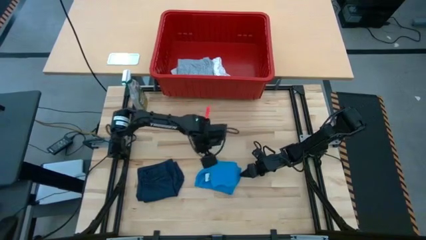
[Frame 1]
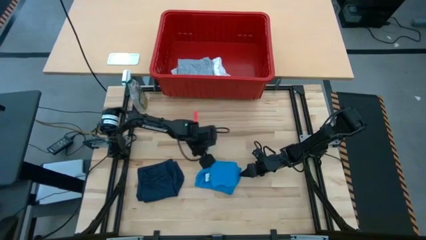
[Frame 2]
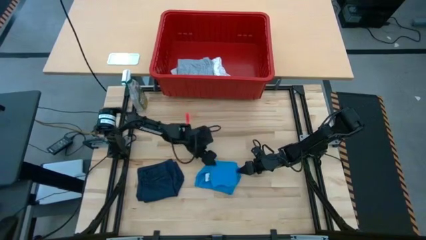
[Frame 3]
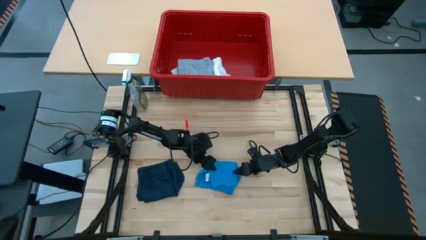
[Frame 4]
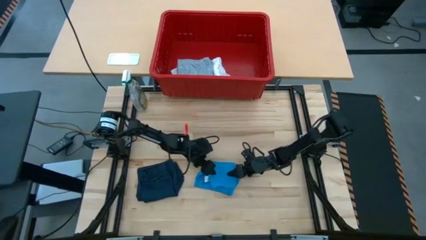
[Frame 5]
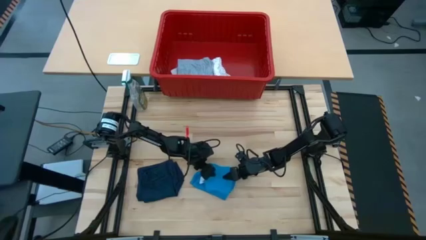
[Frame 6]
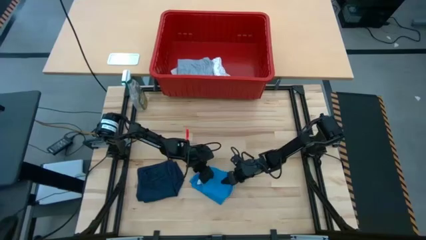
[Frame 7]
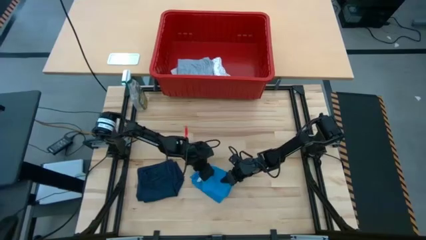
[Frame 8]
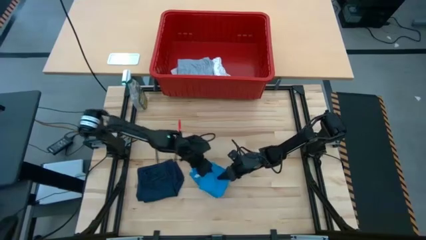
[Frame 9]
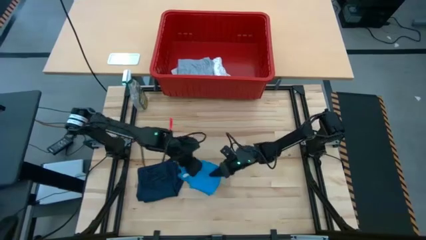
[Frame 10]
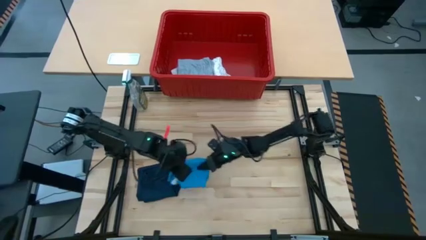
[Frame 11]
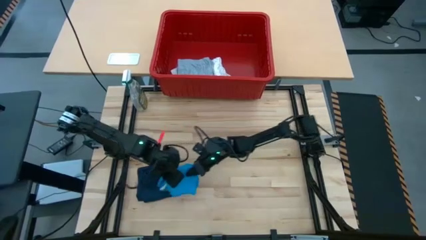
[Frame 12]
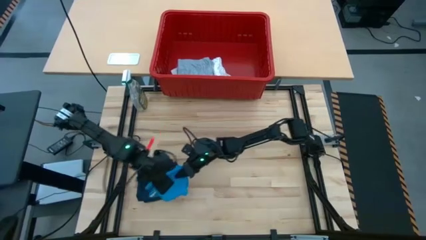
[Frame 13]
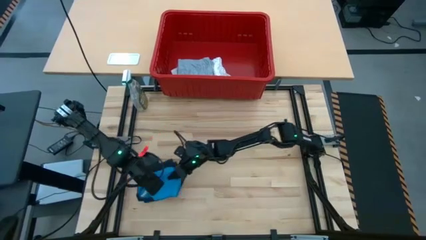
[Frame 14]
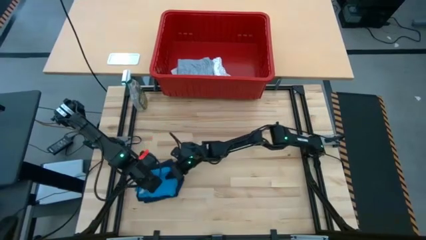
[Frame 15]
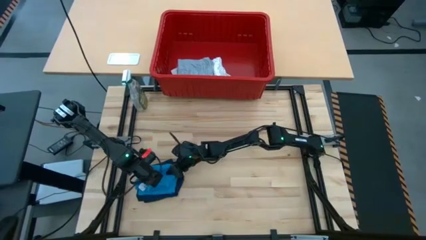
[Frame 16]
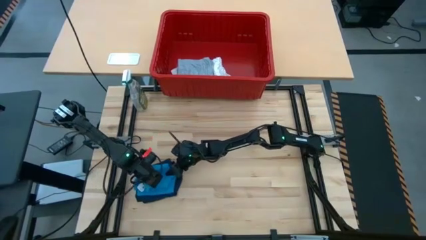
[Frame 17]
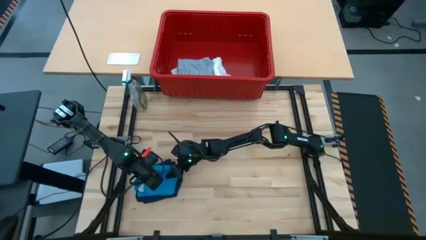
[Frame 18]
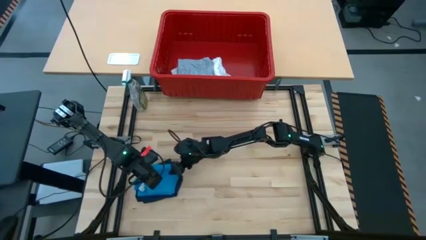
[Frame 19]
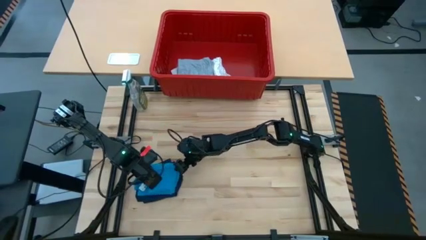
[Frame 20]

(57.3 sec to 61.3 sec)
Task: Fold laundry
Stack the light blue shorts on top of the dark blue shorts

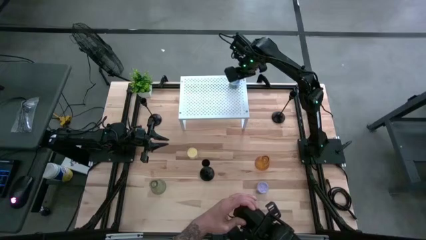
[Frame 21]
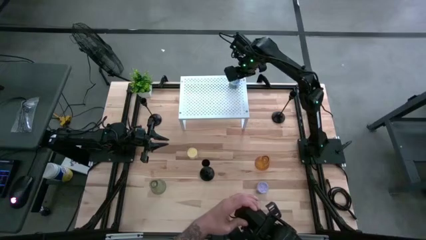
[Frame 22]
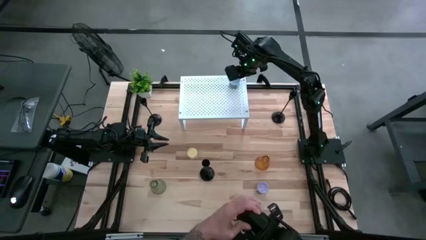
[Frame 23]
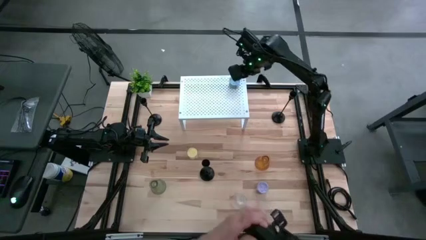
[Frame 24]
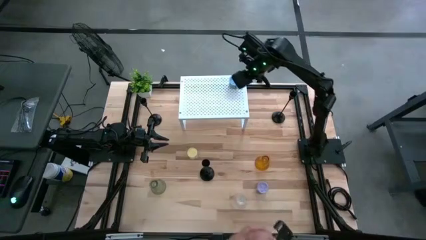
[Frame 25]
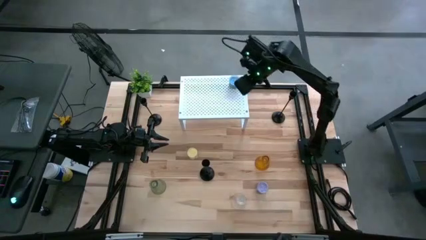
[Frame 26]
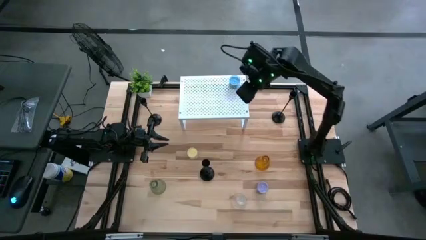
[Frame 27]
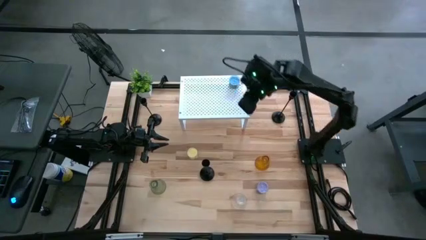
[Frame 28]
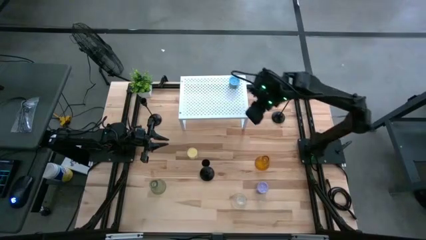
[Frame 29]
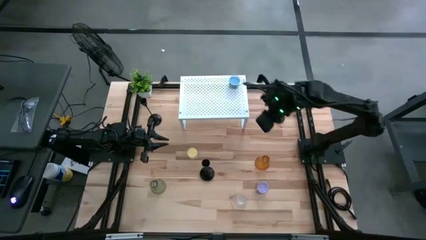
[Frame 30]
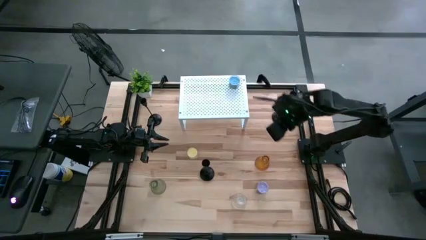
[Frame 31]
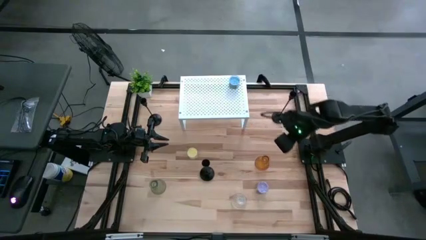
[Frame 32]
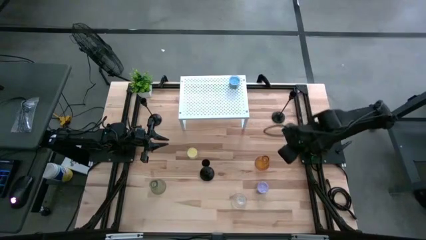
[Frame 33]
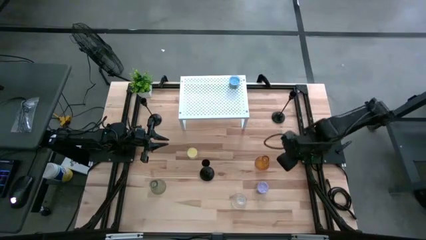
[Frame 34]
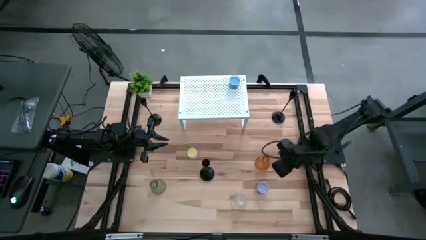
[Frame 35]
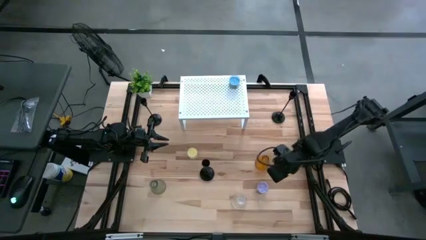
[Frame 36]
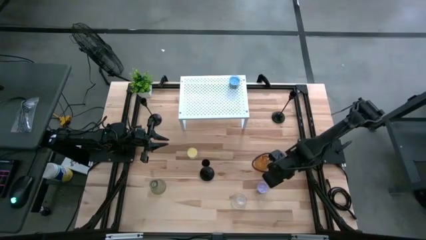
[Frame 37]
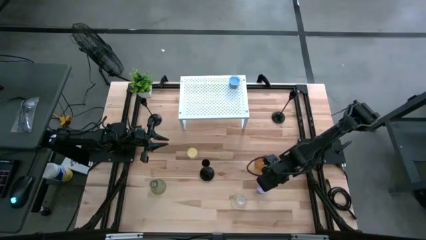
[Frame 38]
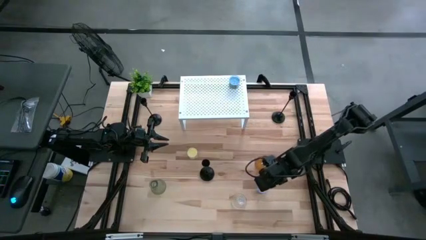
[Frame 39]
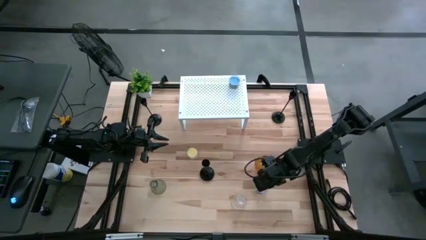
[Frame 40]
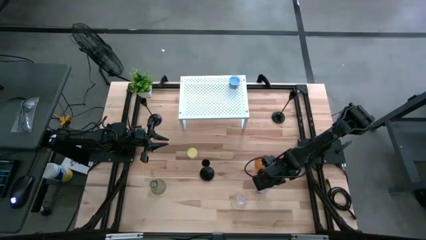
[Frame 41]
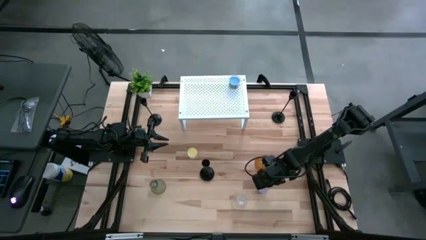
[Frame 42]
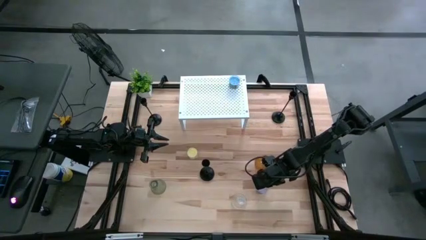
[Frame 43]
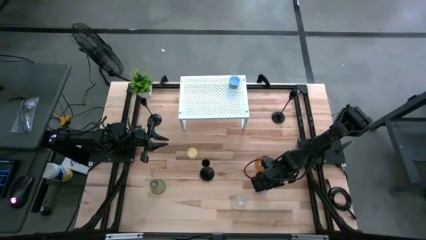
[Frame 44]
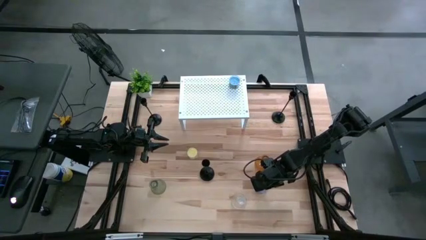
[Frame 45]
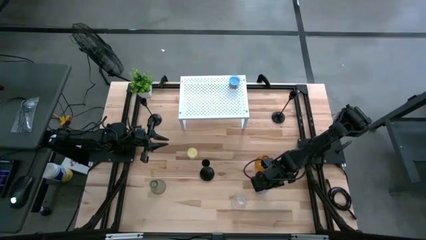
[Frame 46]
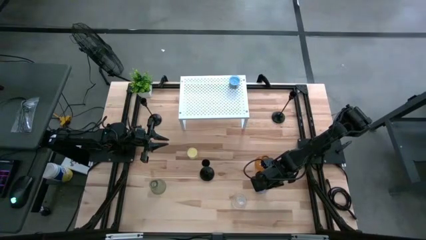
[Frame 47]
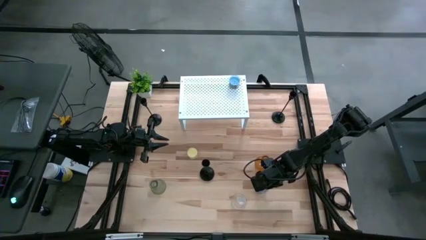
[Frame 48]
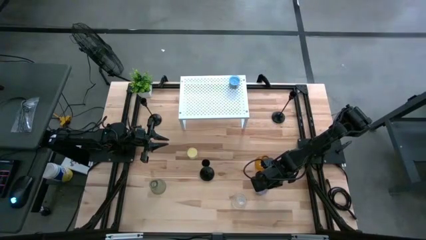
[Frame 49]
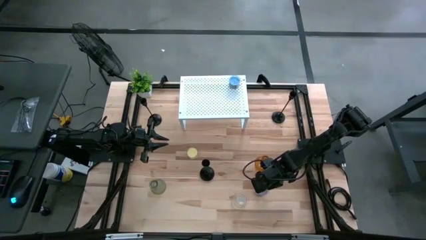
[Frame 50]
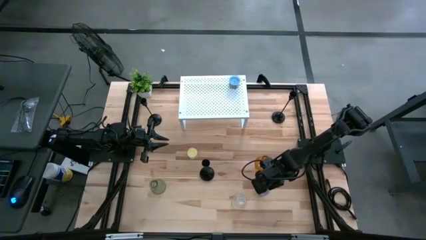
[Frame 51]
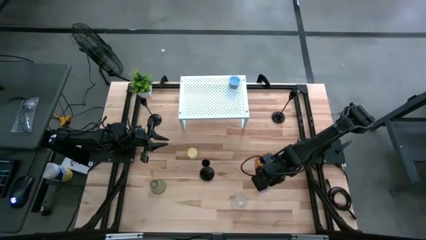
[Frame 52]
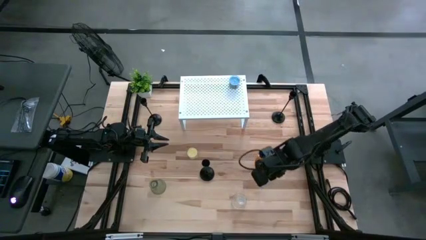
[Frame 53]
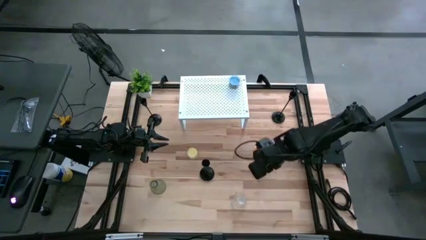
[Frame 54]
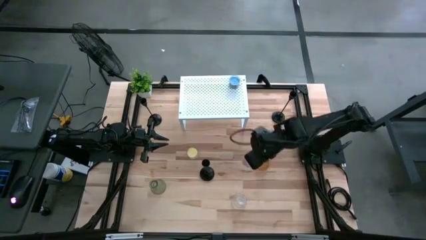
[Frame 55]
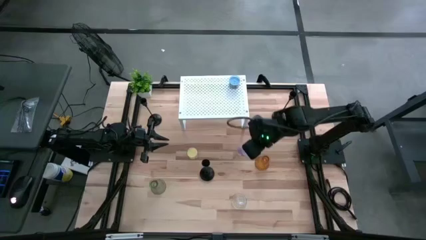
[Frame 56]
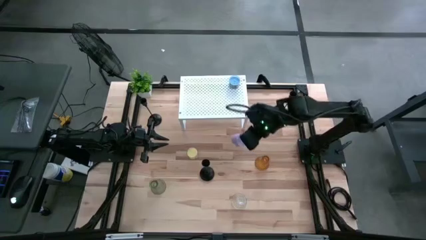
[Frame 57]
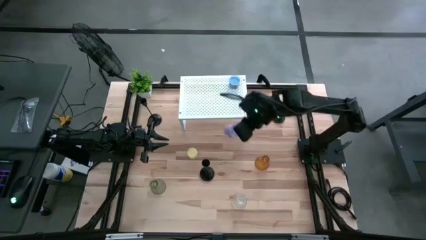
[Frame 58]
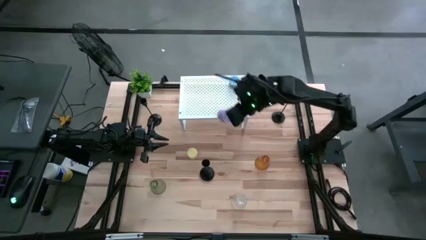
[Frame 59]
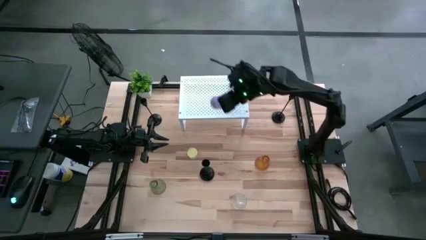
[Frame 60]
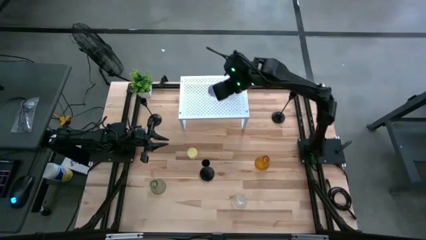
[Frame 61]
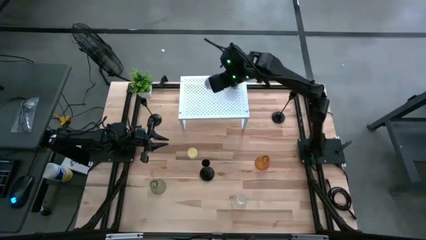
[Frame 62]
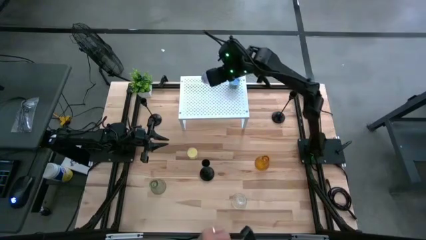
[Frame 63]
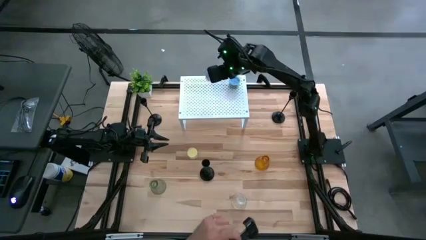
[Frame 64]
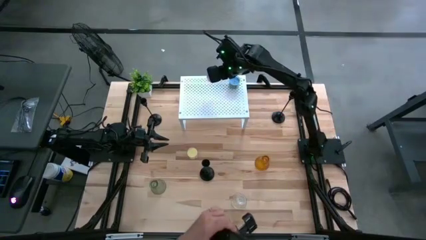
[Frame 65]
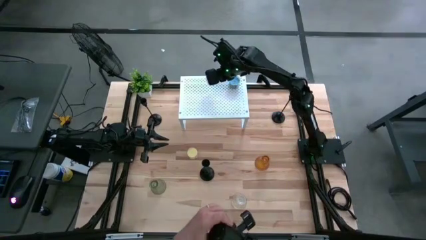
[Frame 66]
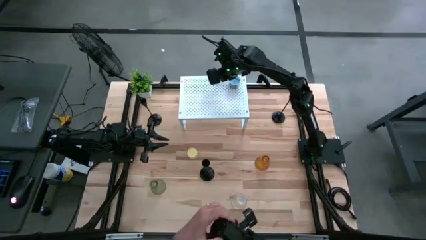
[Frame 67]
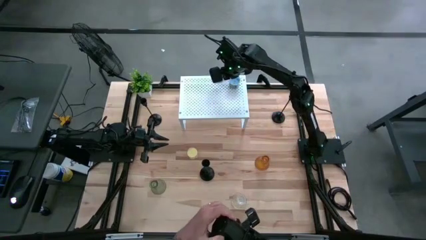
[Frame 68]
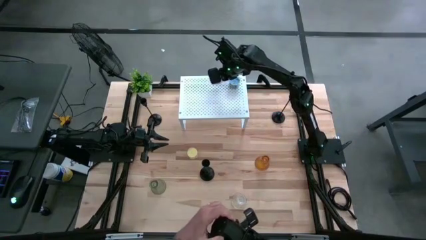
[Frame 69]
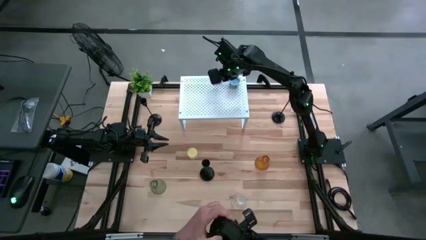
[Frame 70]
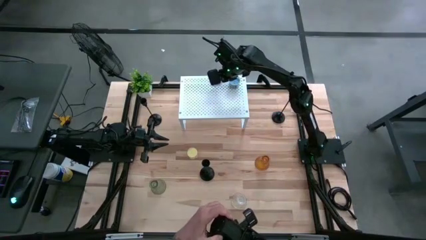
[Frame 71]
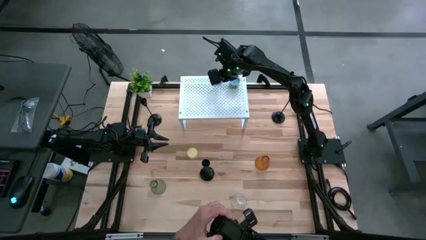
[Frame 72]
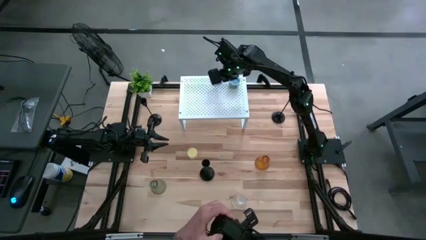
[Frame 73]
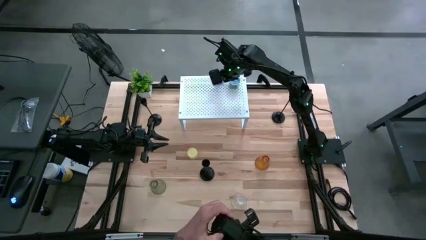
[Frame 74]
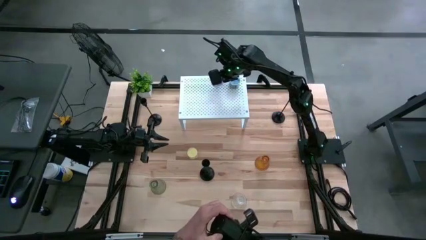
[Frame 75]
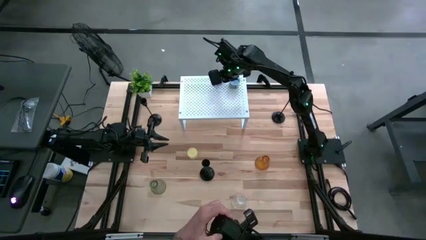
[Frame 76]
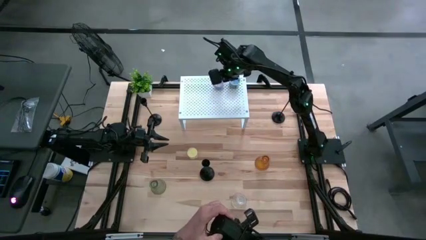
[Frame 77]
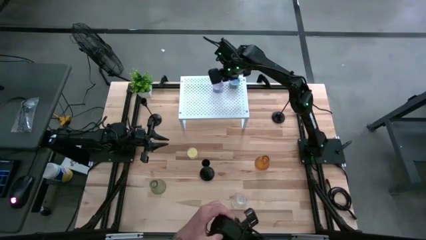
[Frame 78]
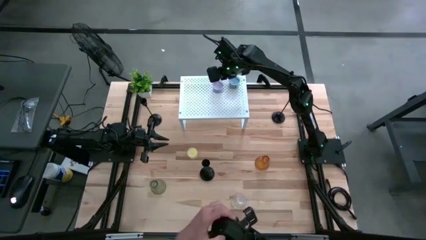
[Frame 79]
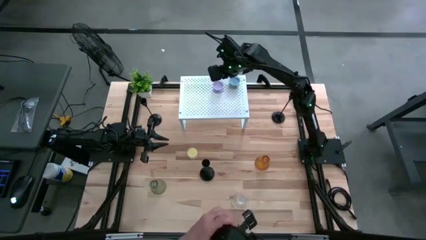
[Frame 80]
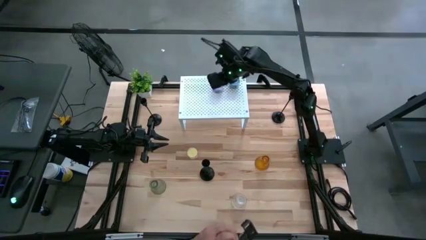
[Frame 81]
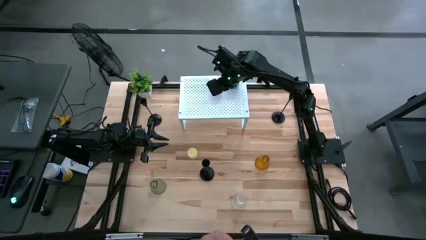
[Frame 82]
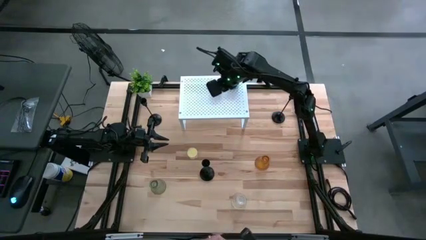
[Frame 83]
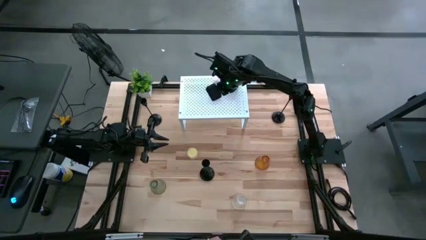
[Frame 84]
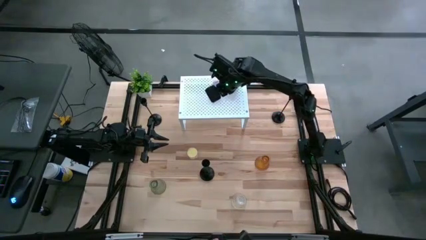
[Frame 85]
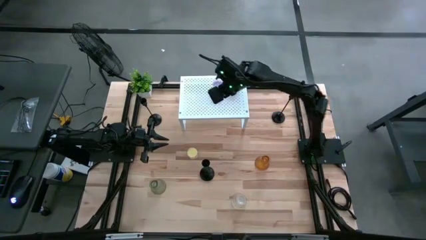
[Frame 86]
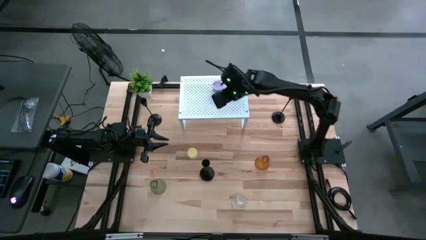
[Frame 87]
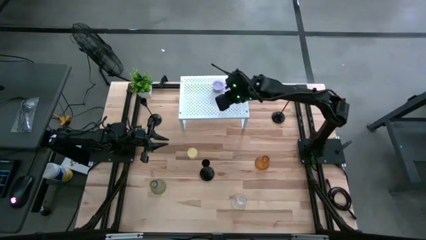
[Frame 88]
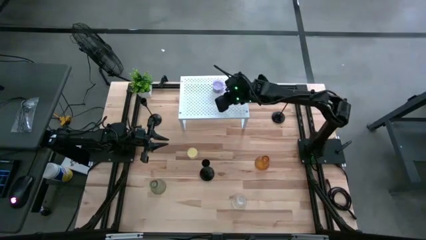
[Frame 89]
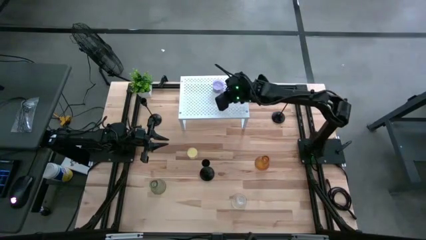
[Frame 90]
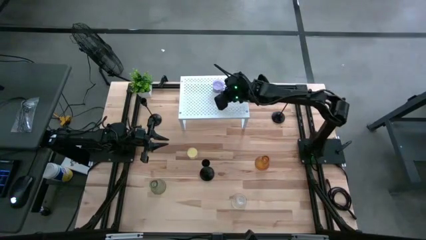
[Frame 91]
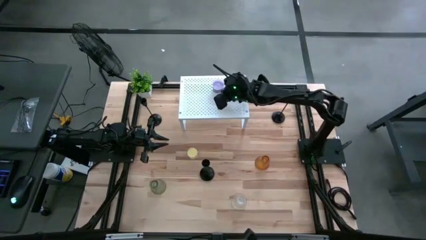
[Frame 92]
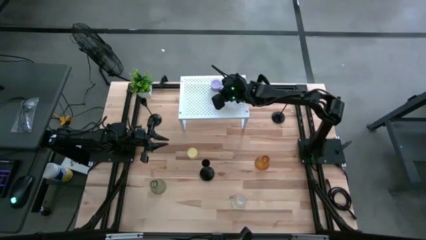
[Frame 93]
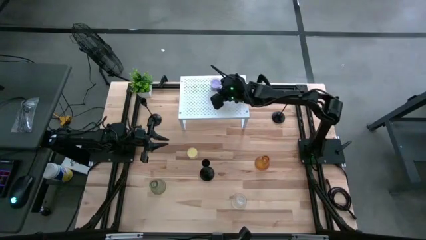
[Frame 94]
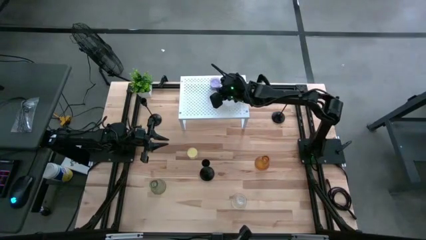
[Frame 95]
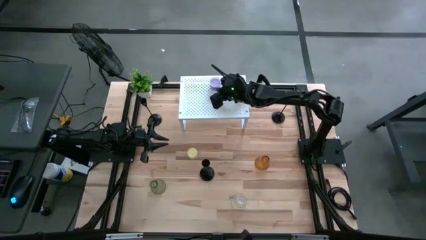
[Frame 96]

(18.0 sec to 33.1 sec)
Task: Pick & Place candle stick holders
Put the purple scented candle on the shelf
